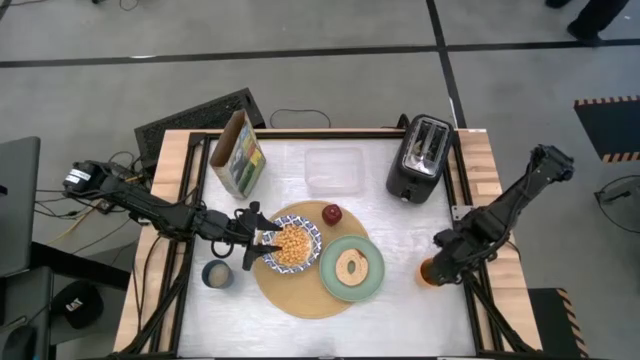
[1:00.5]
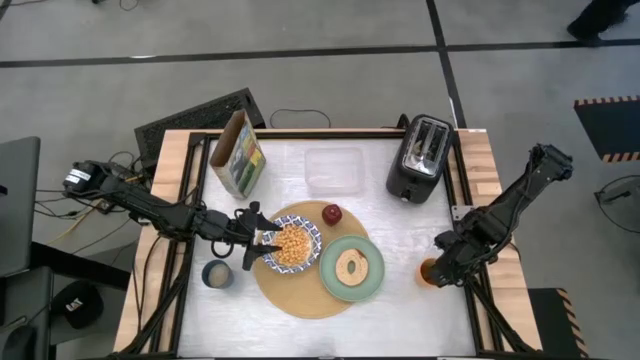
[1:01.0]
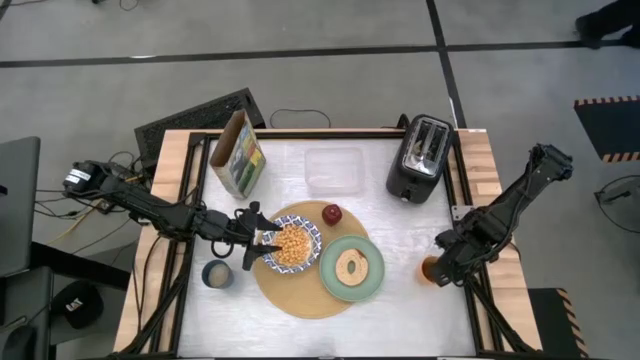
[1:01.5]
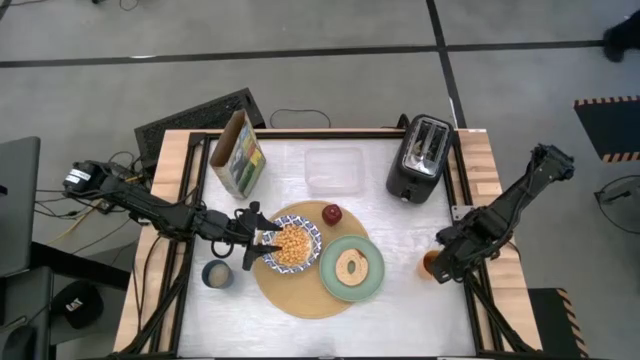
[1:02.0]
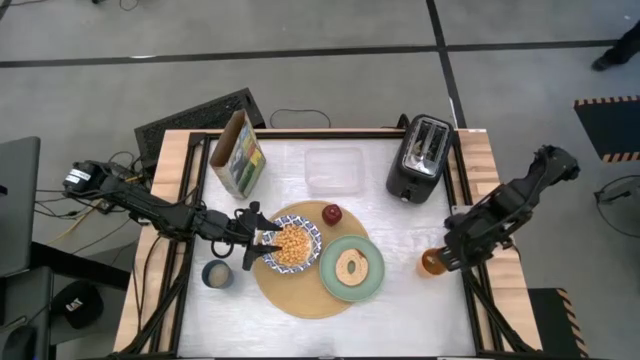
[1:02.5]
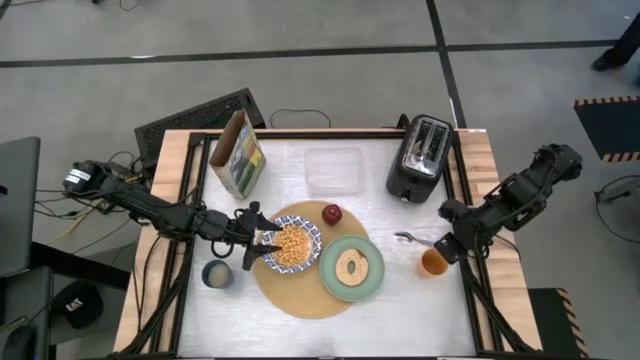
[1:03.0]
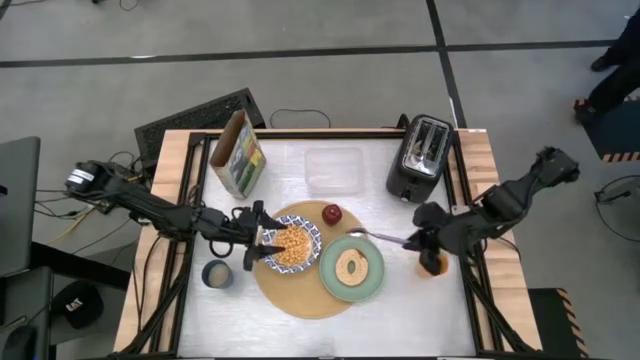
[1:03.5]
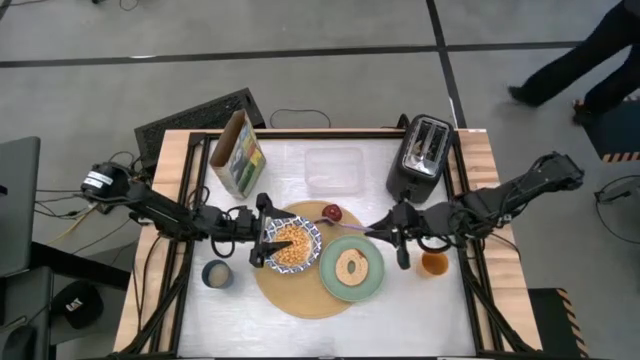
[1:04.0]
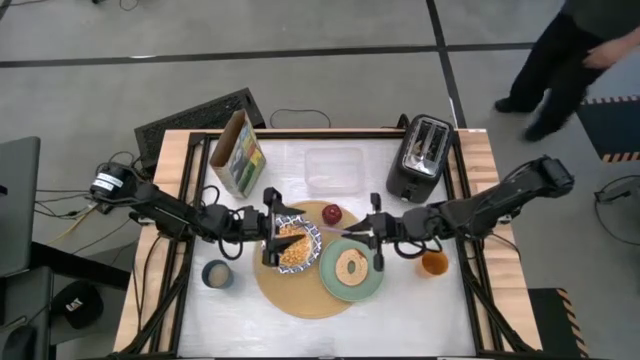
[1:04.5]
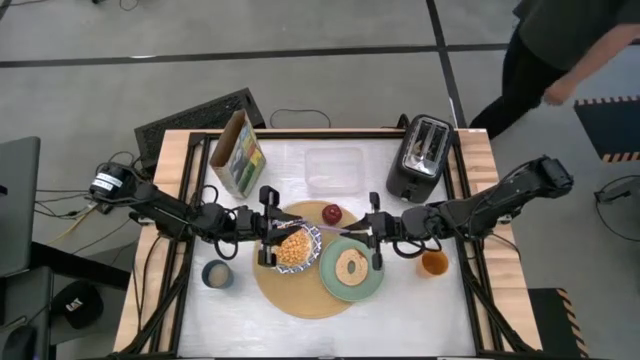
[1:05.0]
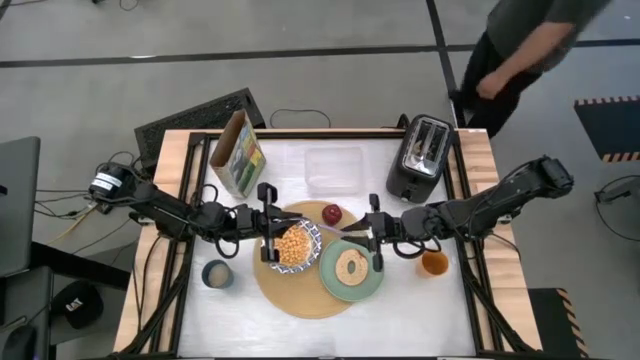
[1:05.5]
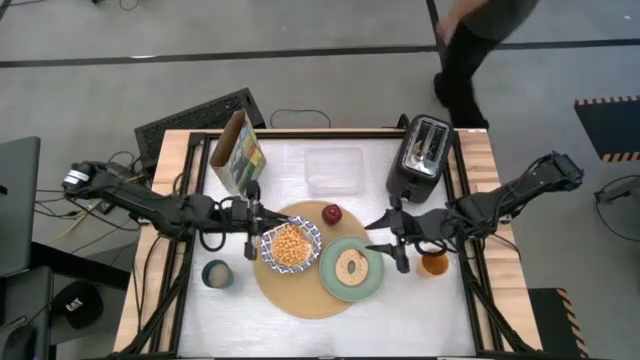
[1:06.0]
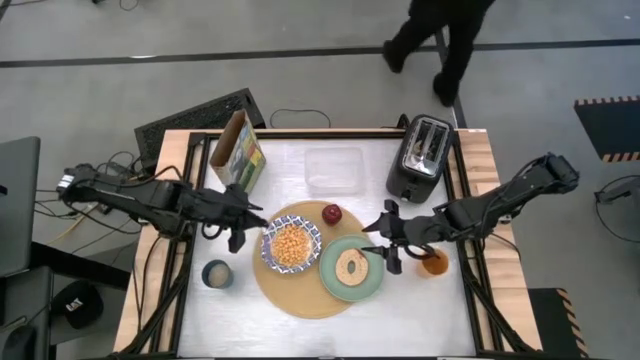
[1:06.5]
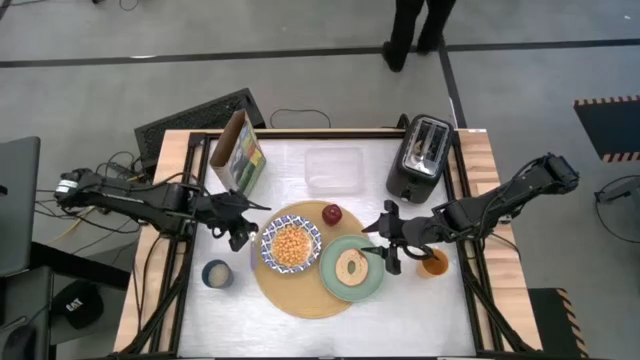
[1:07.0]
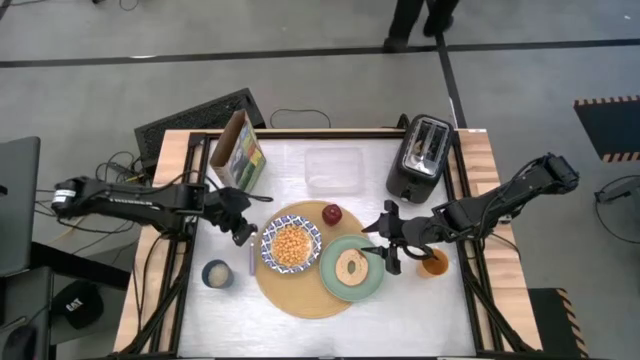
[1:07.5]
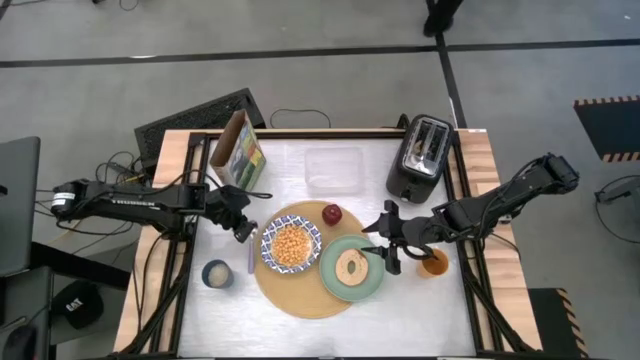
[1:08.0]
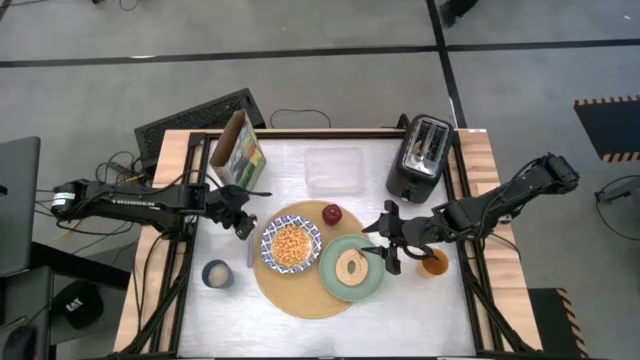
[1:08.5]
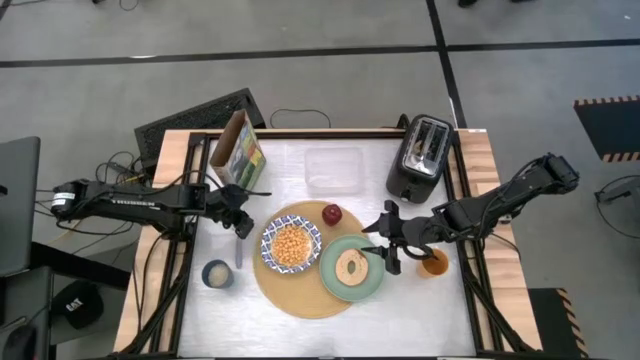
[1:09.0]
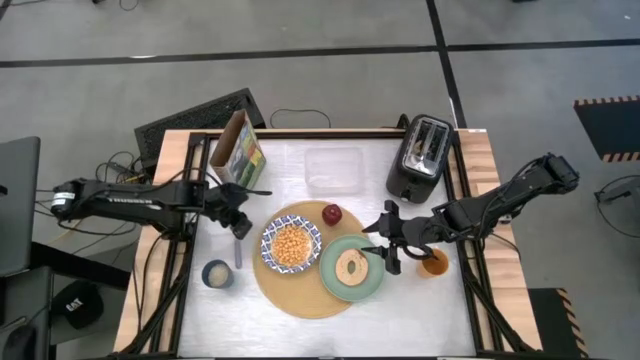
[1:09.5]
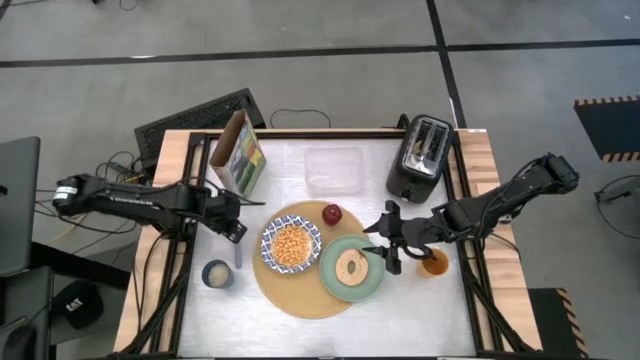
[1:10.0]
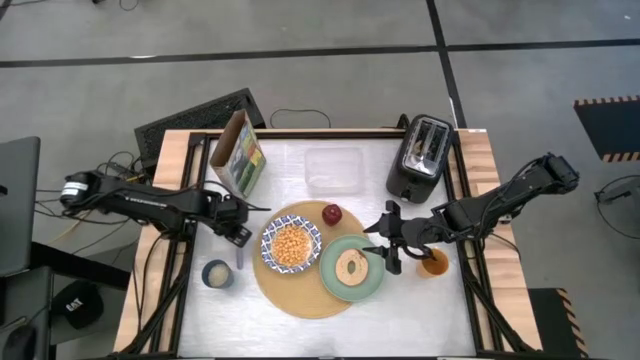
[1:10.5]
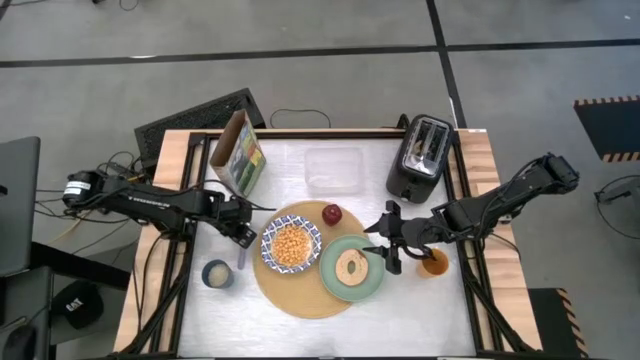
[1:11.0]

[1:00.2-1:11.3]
Task: Arrange a breakfast setting
Put the purple spoon on the left side of the brown table mat

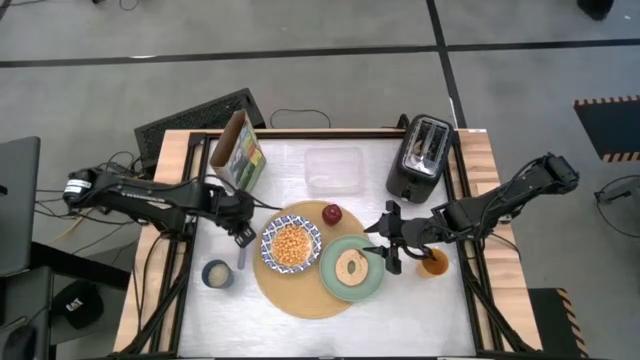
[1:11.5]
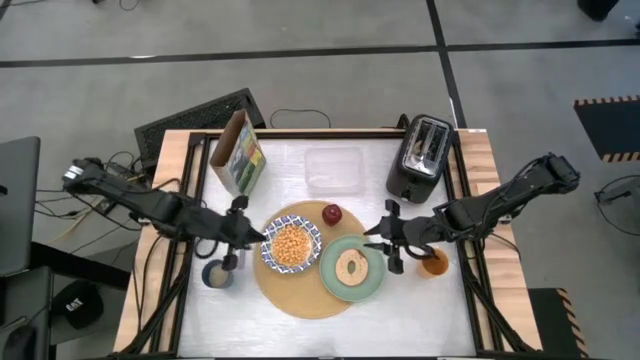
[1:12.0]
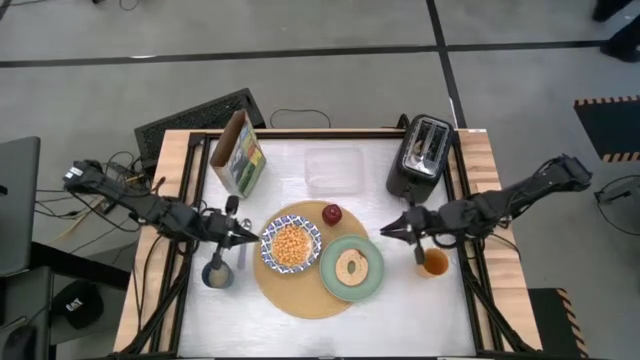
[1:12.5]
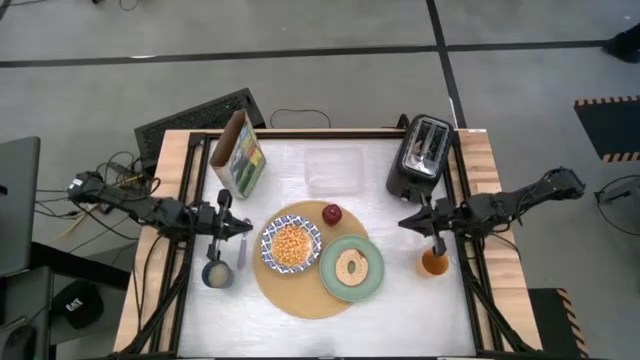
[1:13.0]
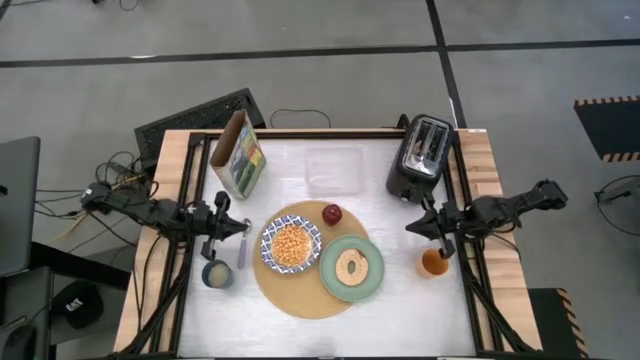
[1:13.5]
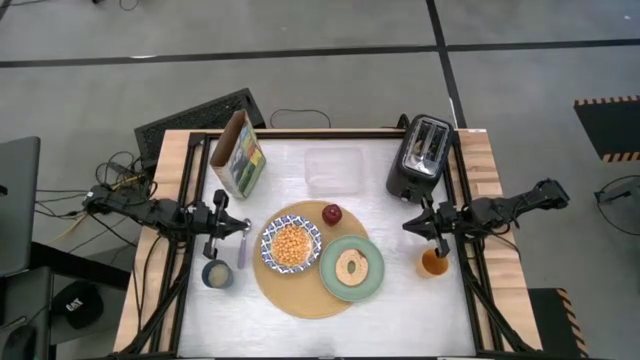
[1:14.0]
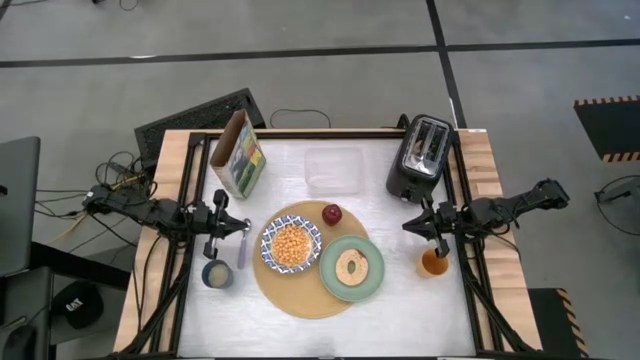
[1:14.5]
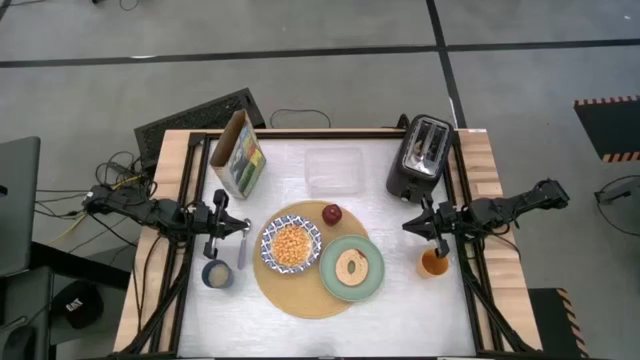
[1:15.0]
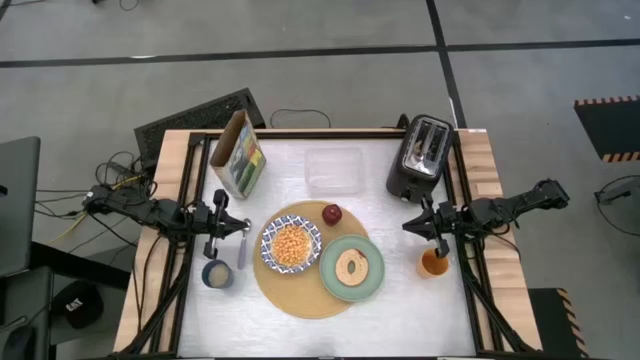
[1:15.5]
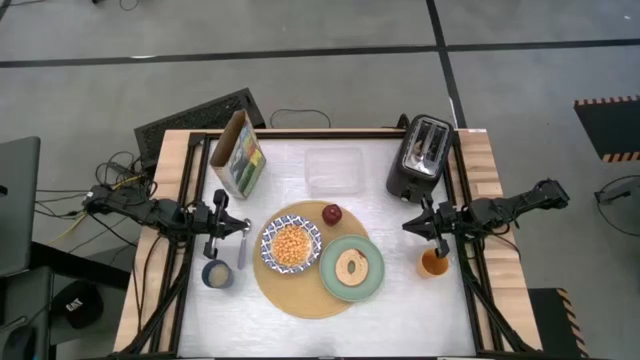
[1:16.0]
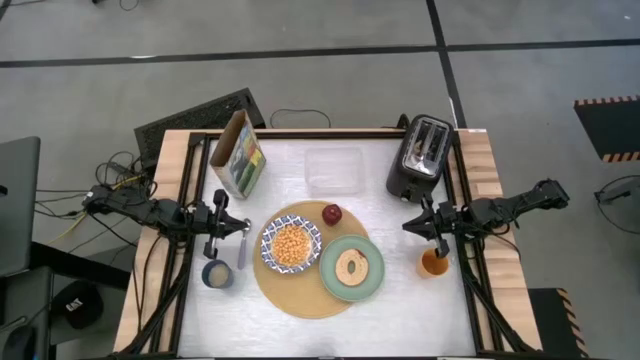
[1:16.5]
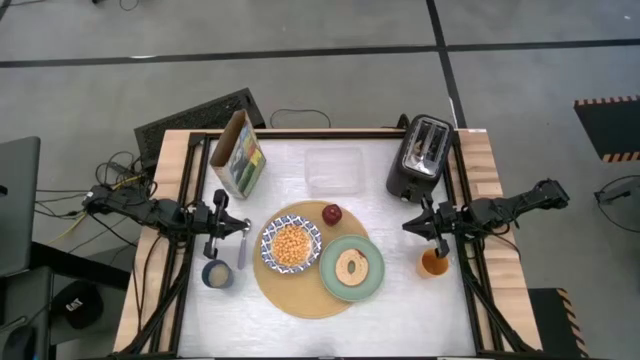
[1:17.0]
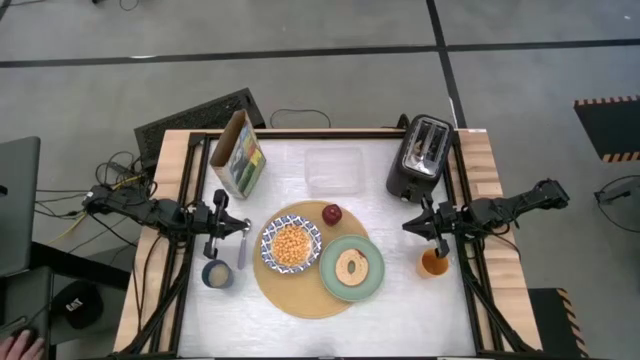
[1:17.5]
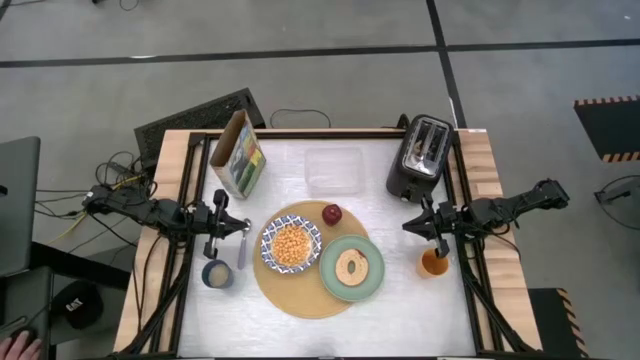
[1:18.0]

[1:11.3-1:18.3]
Return to Home Position

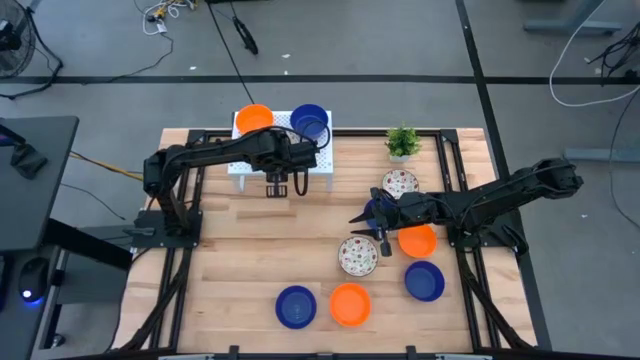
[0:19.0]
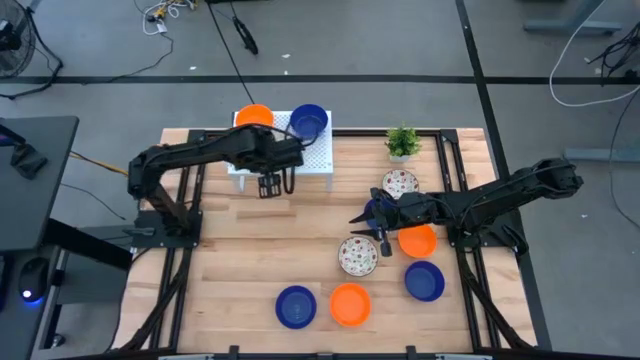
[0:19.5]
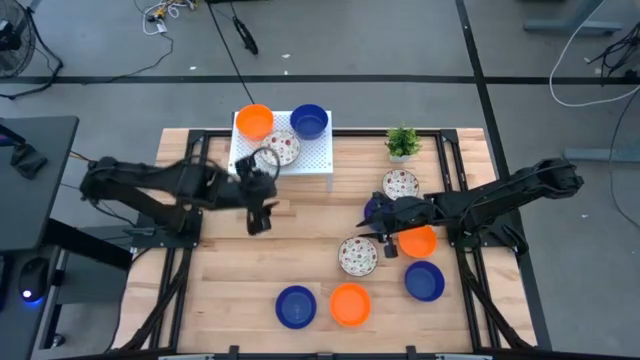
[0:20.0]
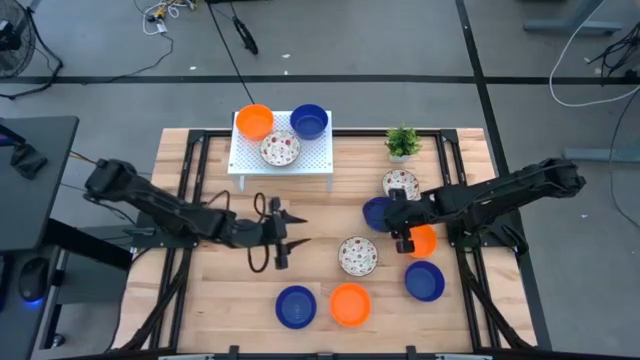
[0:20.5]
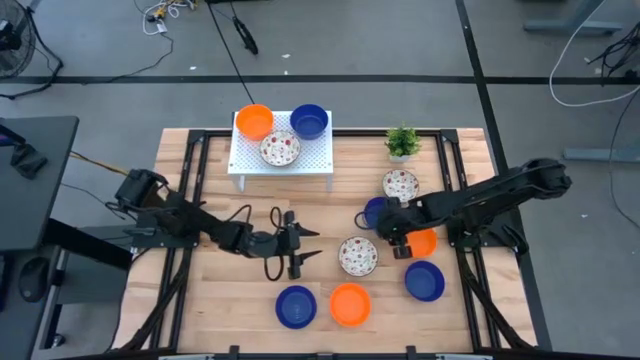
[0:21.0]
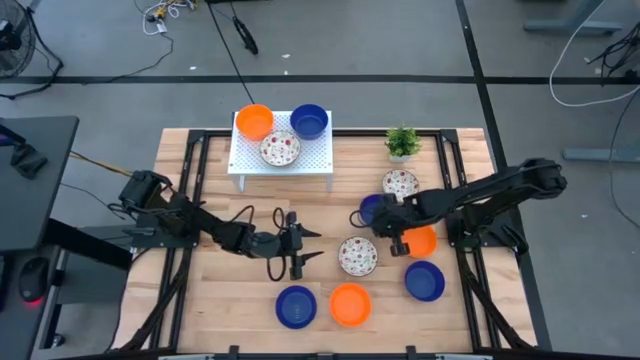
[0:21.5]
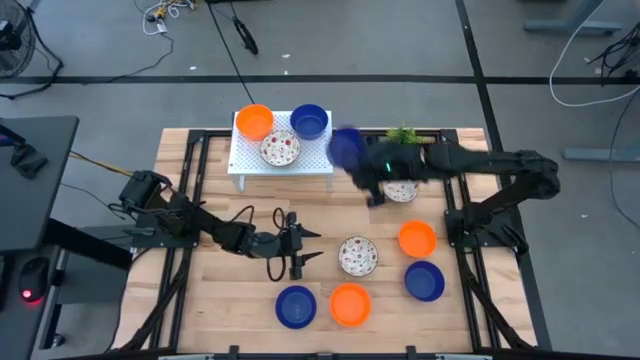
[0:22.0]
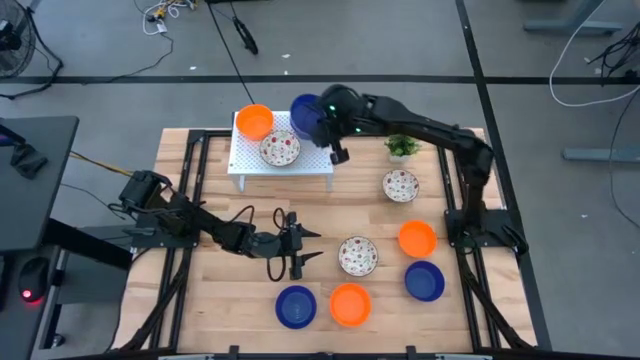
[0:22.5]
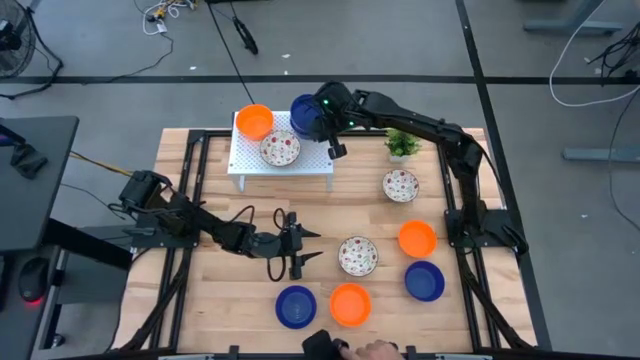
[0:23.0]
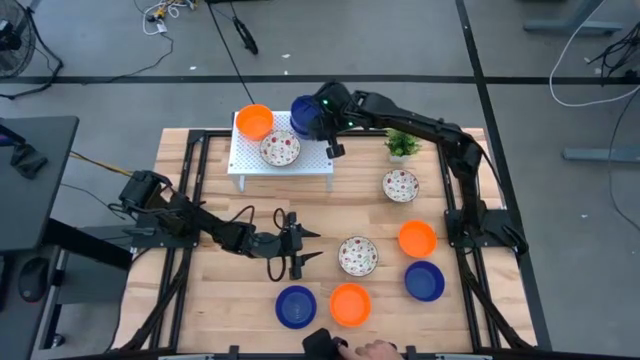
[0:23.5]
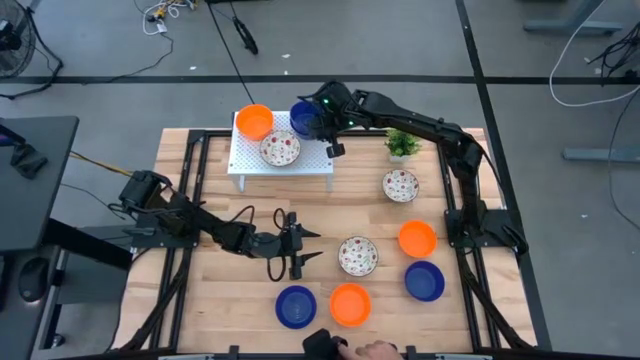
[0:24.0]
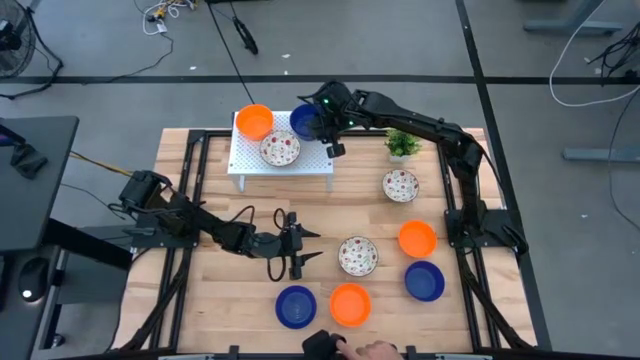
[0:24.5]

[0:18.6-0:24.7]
Task: Pick & Place Mini bowls
Stack the blue bowl on top of the blue bowl on the shelf
